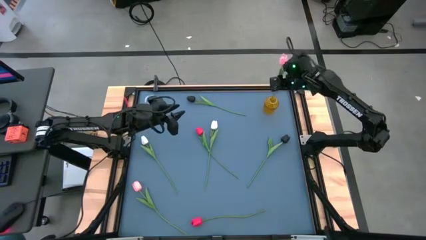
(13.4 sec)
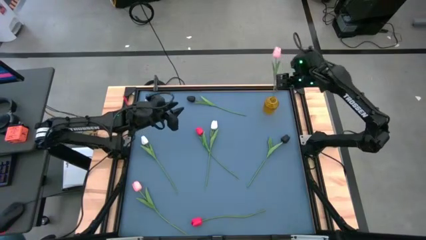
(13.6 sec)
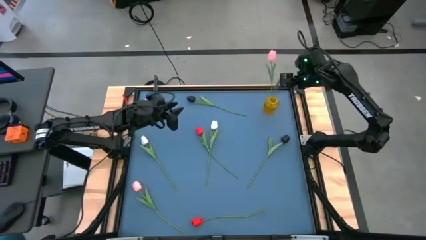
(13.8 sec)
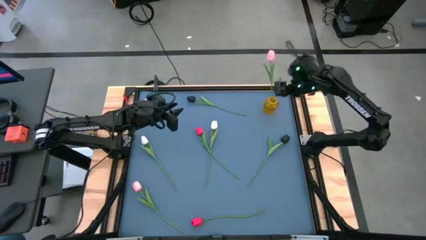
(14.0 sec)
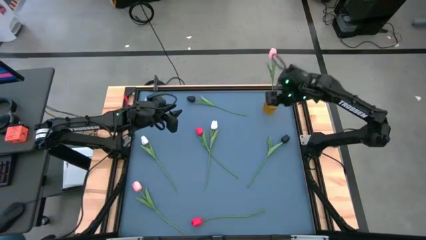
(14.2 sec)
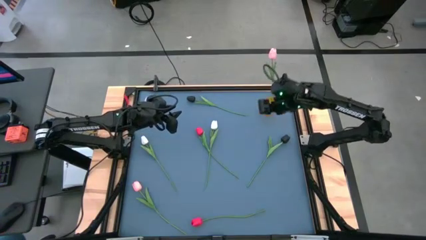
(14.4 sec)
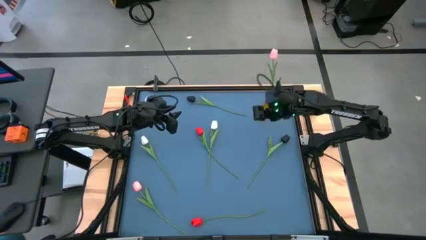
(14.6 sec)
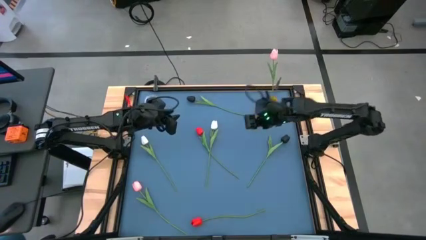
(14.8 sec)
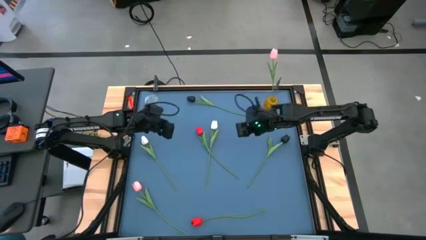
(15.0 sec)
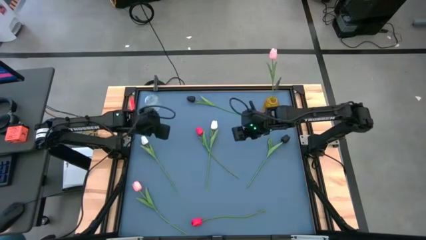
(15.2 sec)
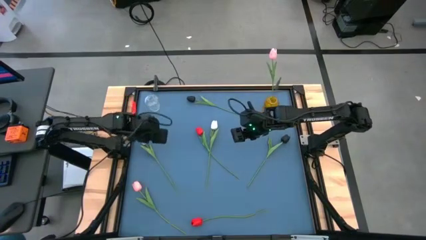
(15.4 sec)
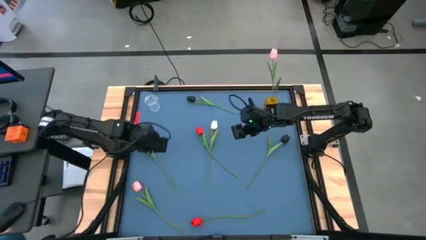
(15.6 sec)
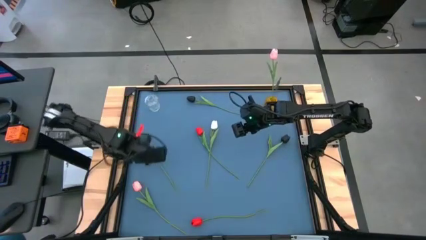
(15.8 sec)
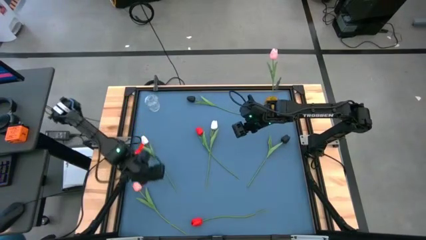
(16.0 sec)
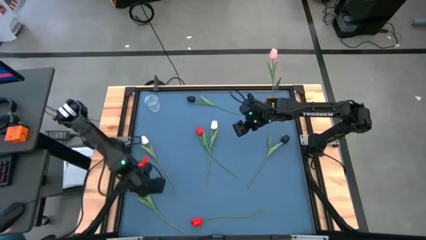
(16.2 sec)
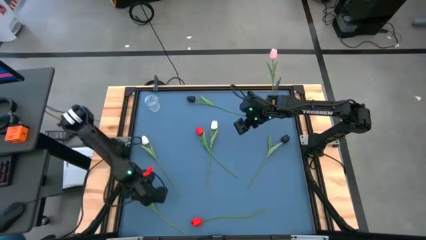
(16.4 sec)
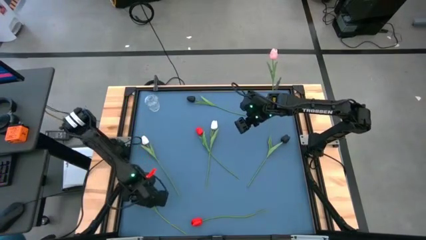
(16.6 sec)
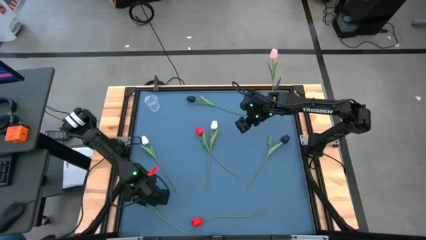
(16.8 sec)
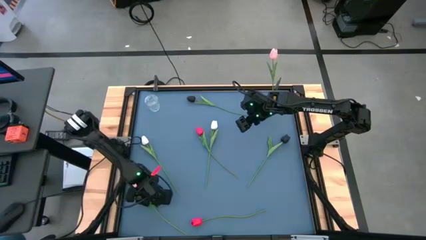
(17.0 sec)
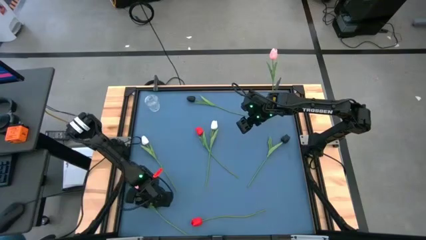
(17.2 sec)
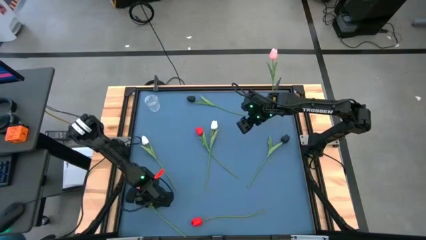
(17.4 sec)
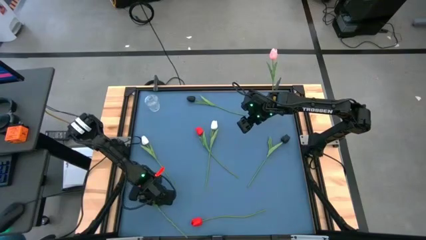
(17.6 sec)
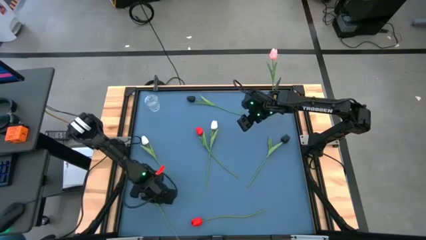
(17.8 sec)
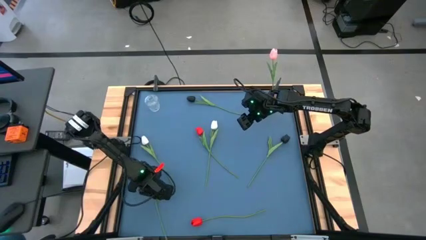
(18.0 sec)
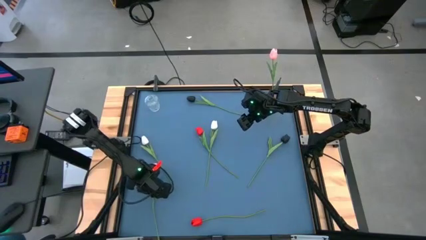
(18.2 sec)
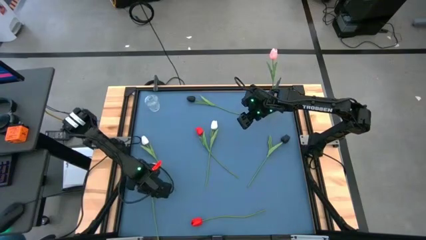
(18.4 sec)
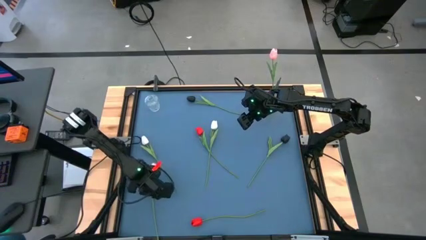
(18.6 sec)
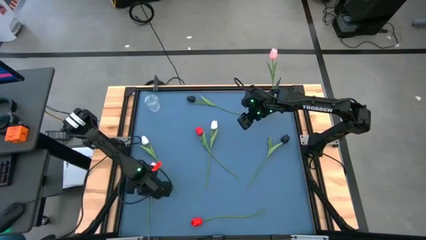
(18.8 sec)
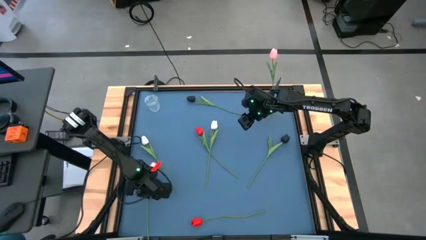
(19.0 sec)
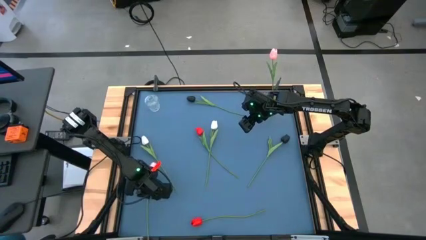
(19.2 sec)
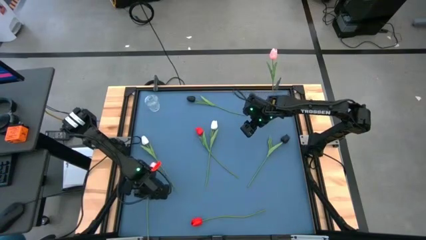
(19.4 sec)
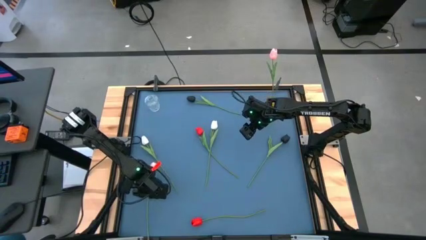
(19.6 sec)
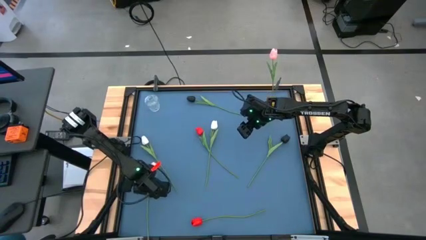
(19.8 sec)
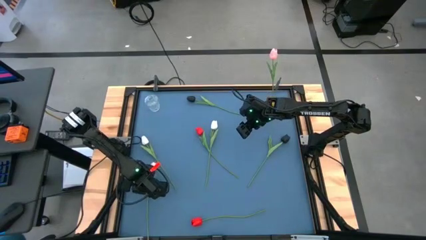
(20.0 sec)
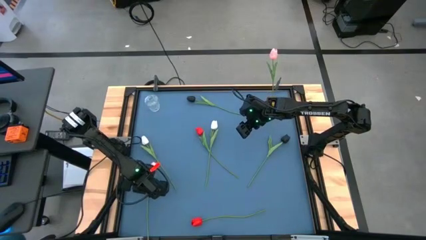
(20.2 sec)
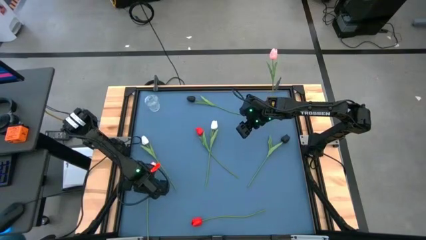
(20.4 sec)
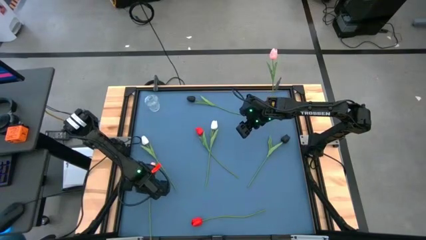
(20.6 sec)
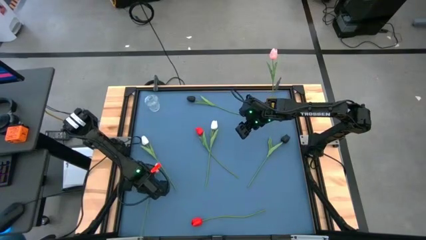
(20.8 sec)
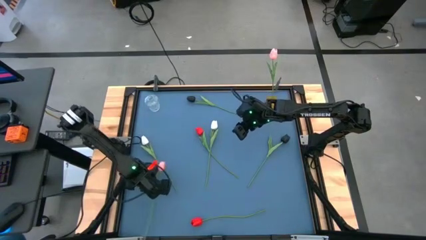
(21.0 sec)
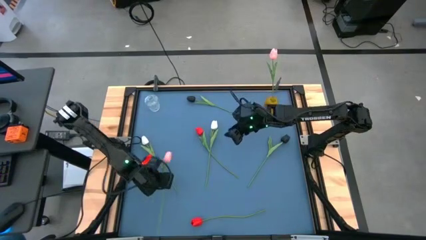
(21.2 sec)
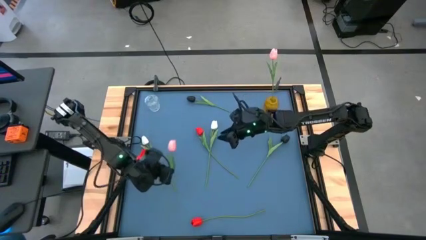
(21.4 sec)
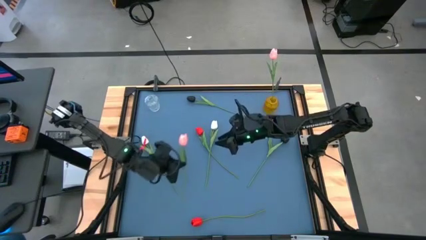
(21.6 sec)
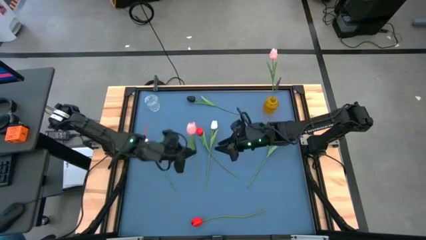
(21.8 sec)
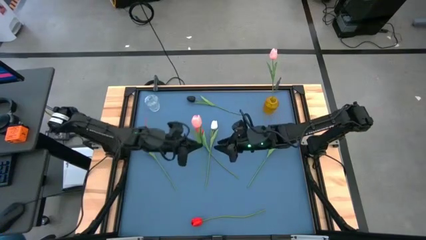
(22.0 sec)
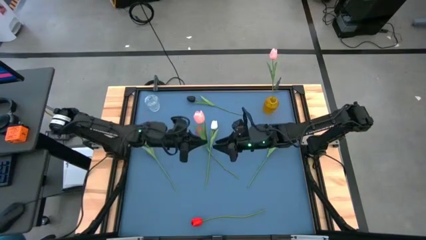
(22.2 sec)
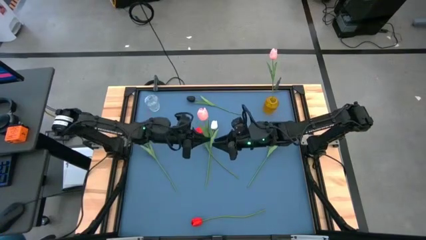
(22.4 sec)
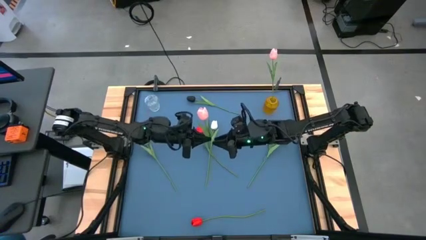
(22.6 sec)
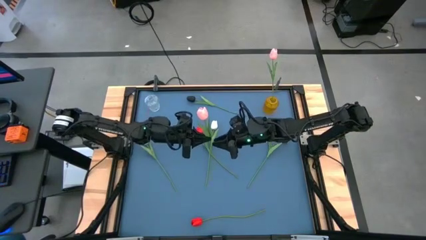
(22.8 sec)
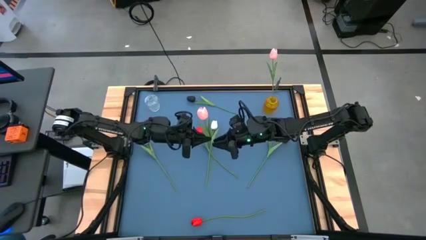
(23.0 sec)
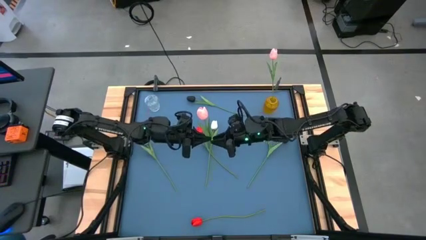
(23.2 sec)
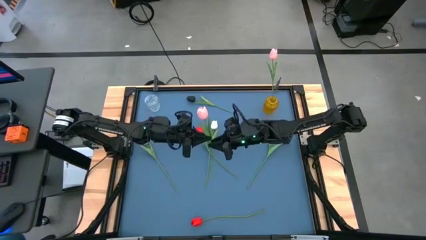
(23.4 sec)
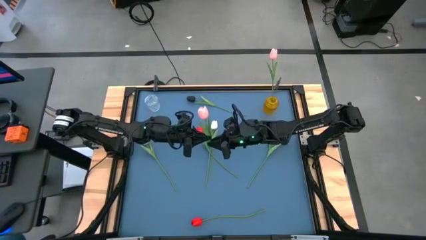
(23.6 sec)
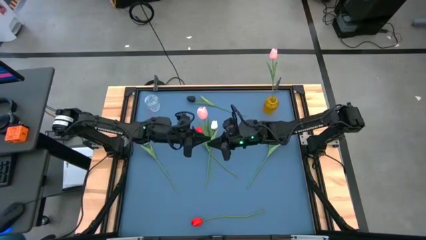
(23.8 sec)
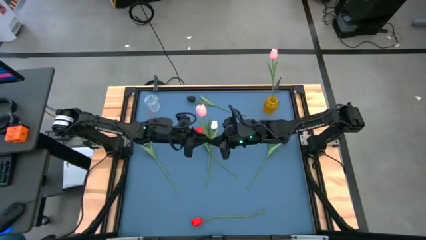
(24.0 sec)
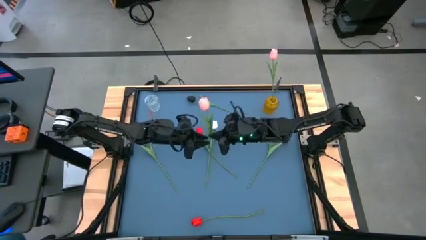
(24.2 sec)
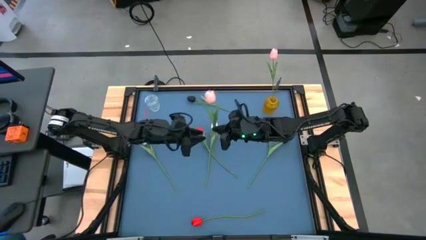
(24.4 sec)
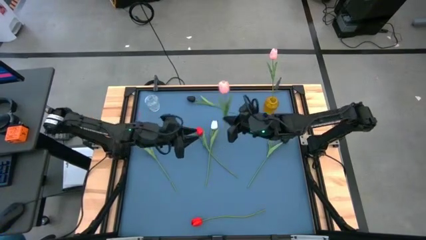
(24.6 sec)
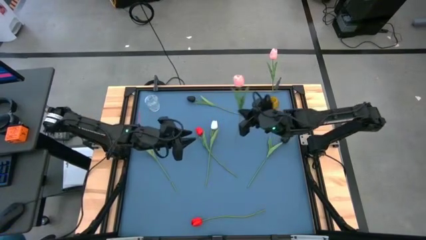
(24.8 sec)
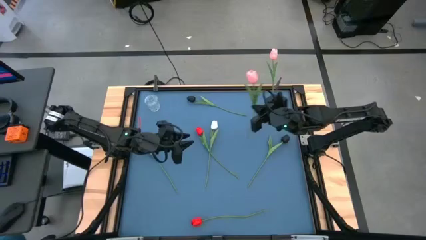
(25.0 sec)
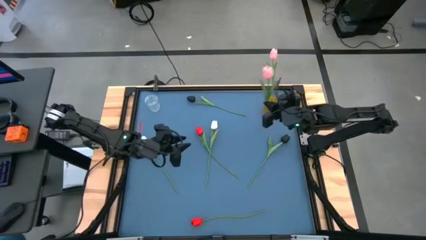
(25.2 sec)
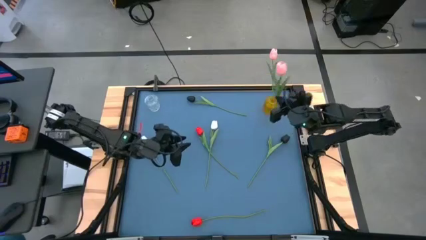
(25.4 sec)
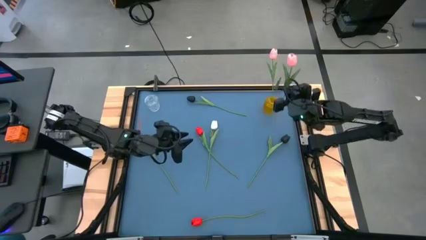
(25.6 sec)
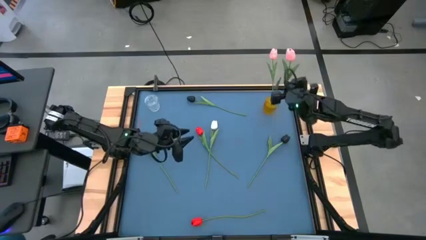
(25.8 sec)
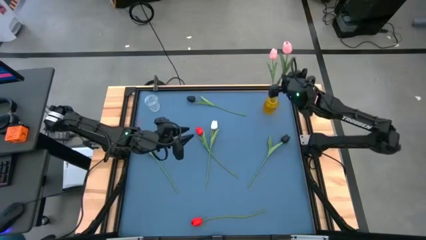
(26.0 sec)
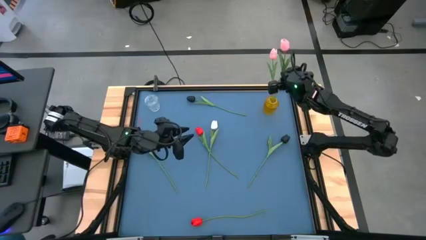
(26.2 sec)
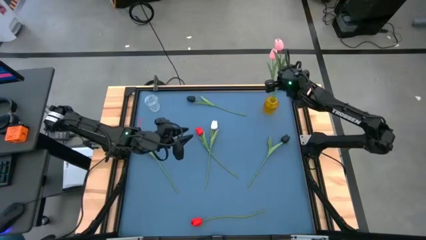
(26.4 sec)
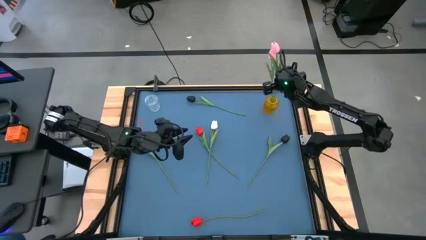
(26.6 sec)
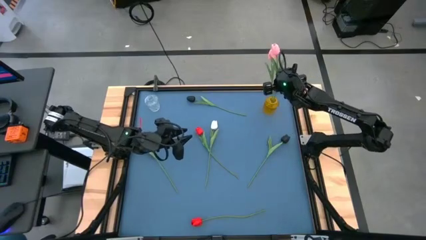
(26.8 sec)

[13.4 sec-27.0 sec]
Task: Sort flowers into vase by color
Put the pink flower into the yellow vase

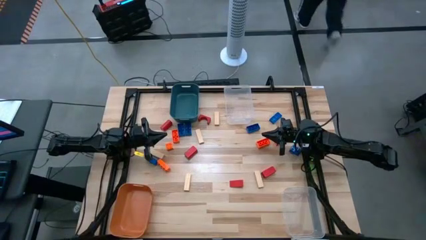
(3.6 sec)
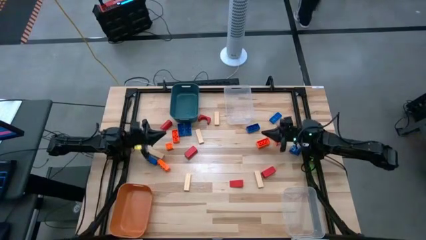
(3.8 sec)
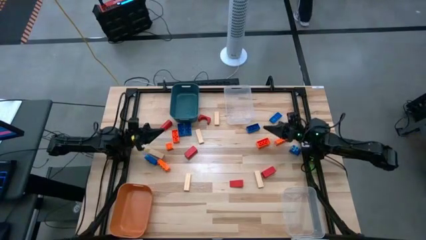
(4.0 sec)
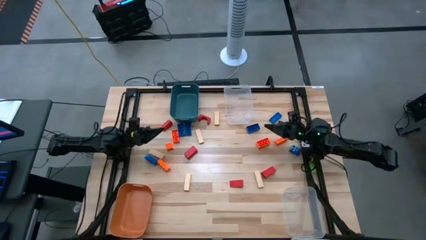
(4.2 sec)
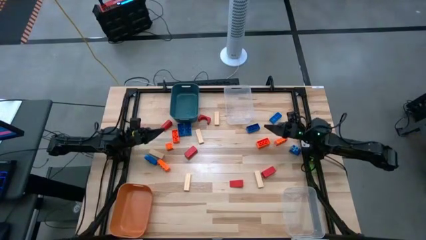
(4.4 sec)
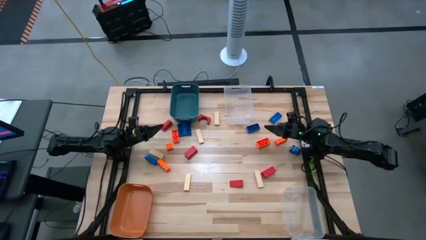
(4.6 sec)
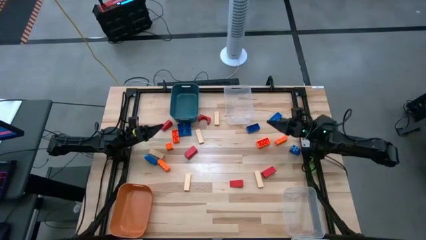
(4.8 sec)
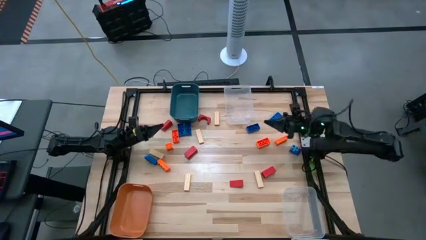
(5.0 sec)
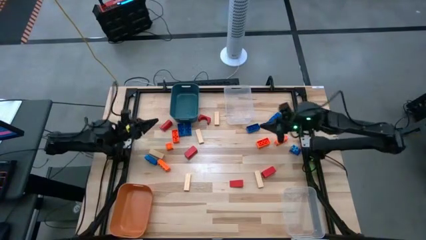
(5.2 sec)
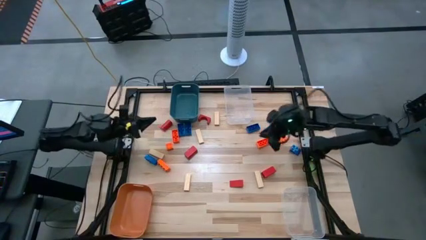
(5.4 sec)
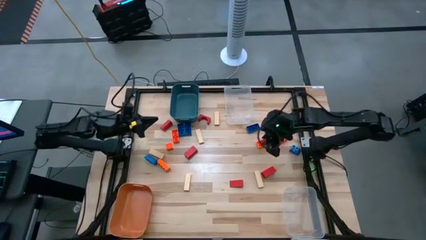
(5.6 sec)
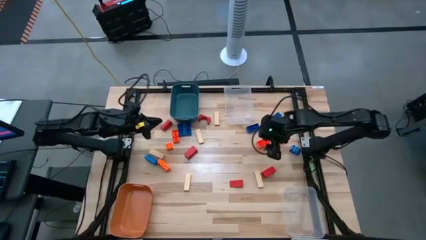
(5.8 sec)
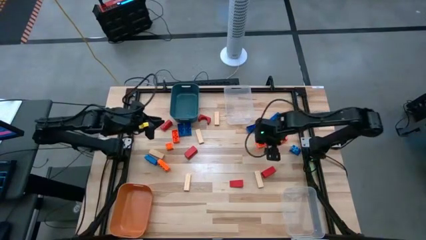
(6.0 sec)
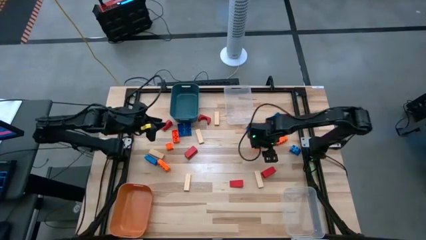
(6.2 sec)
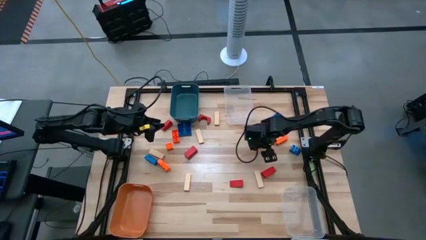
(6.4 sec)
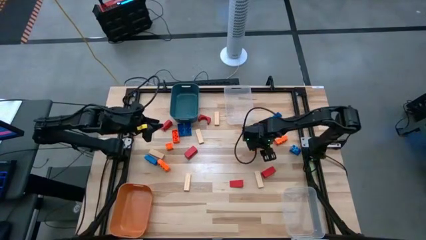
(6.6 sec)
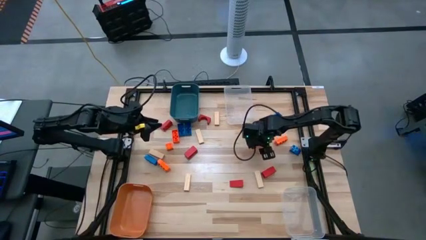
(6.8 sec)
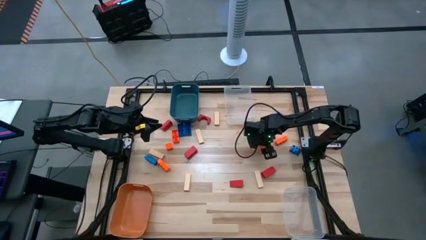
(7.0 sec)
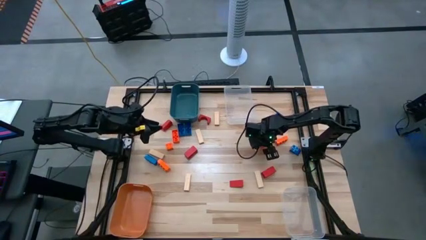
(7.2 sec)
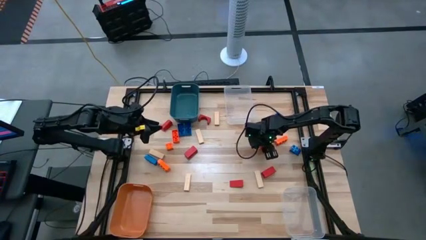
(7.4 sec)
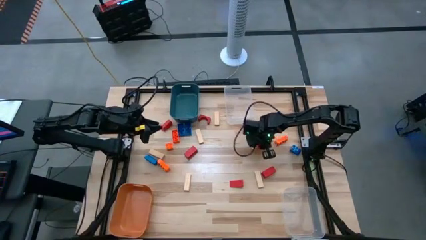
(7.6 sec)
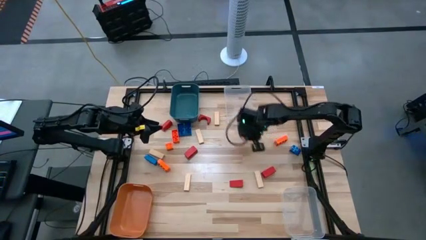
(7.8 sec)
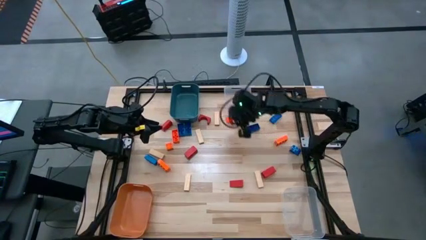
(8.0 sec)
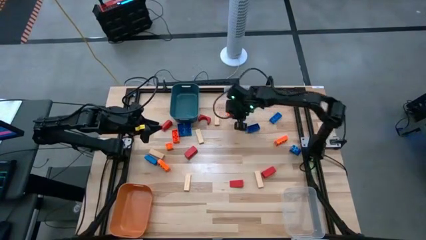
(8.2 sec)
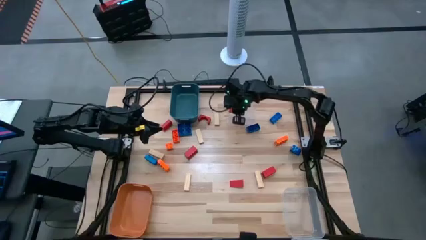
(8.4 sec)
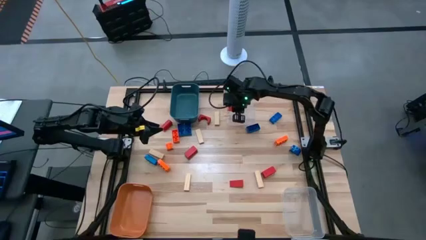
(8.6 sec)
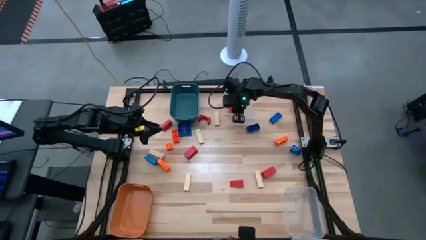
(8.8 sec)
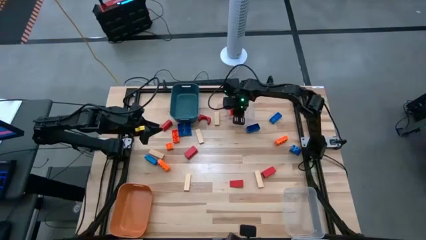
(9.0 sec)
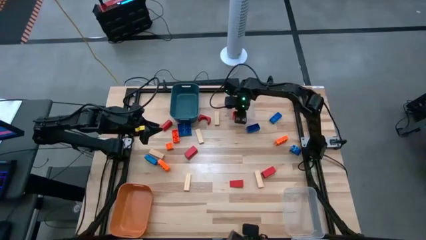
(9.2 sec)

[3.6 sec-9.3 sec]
Task: Sort blocks
Put the orange game piece into the top transparent bin
